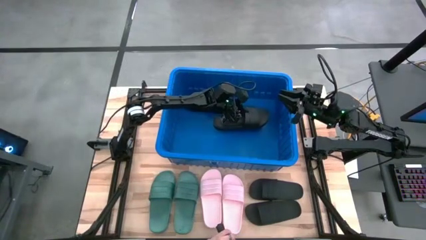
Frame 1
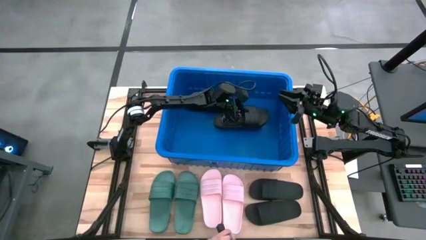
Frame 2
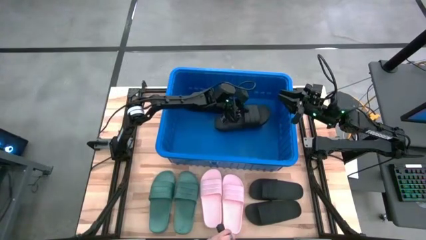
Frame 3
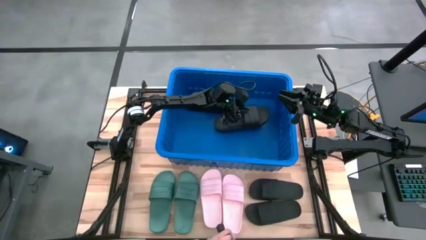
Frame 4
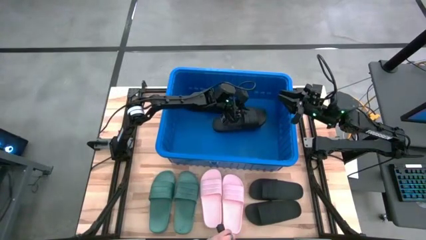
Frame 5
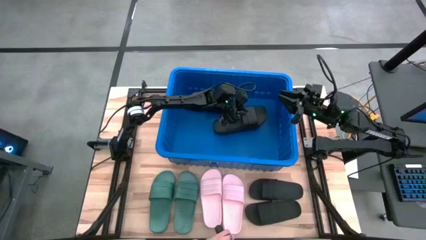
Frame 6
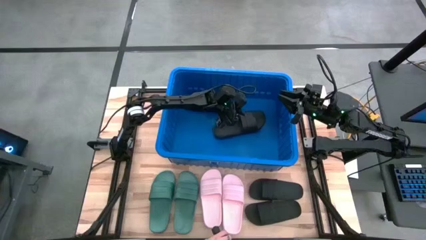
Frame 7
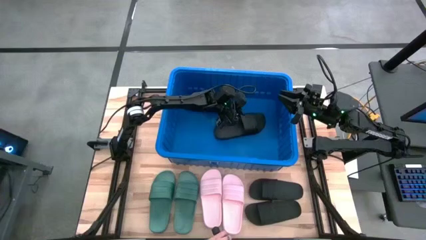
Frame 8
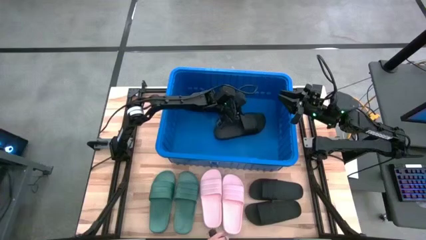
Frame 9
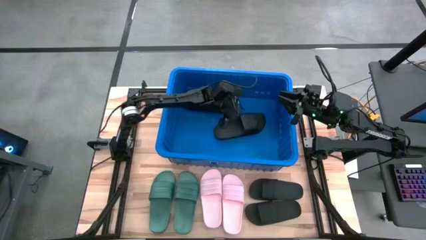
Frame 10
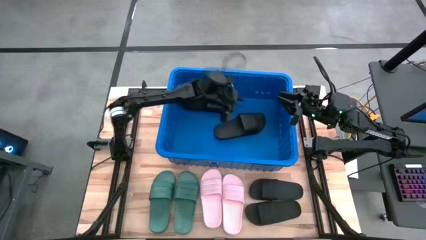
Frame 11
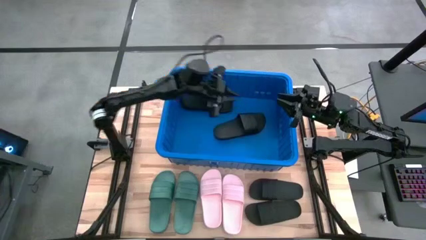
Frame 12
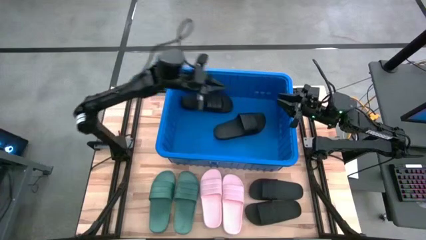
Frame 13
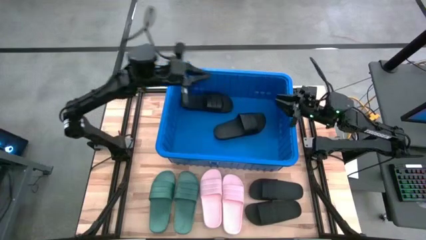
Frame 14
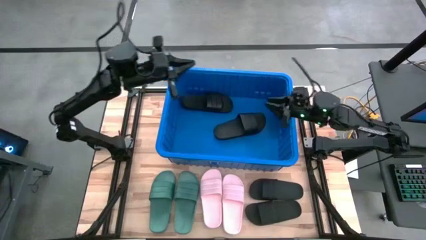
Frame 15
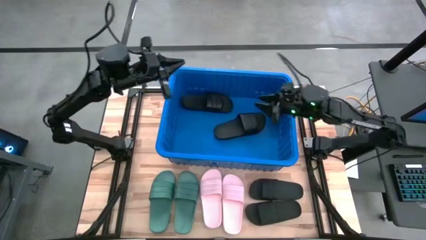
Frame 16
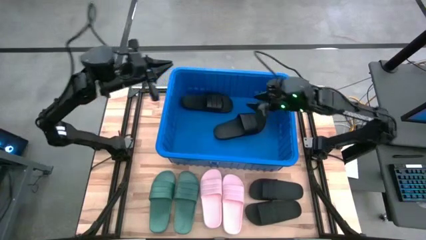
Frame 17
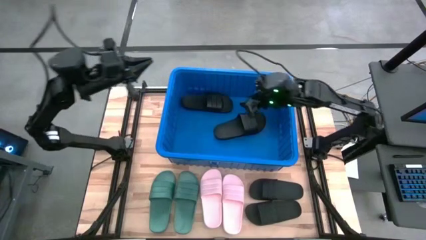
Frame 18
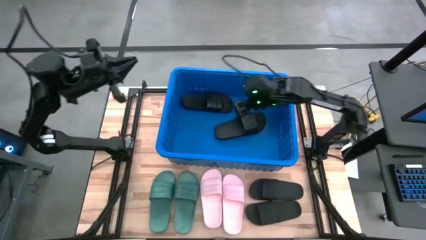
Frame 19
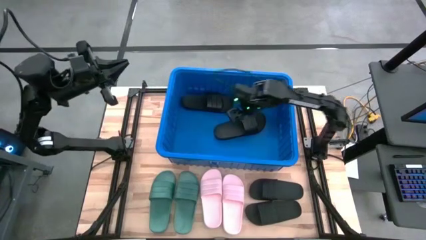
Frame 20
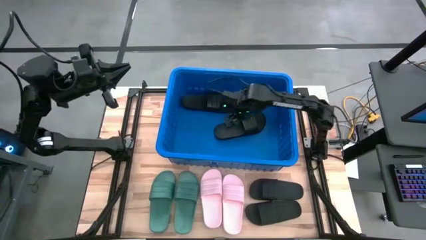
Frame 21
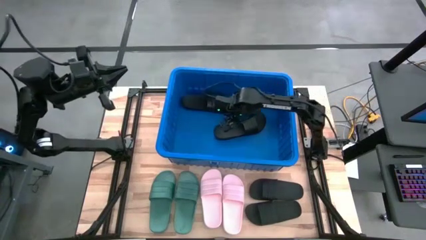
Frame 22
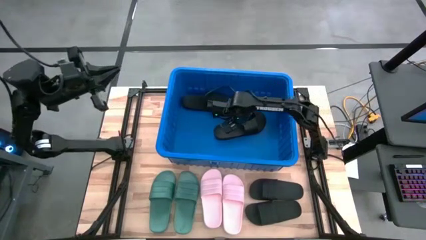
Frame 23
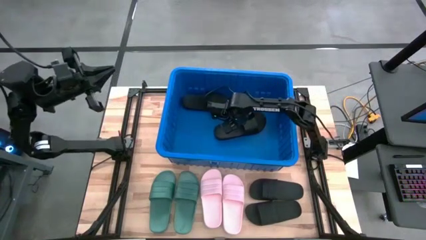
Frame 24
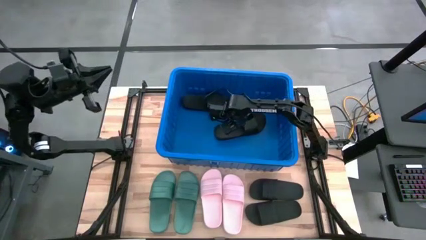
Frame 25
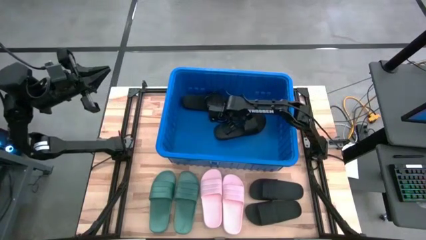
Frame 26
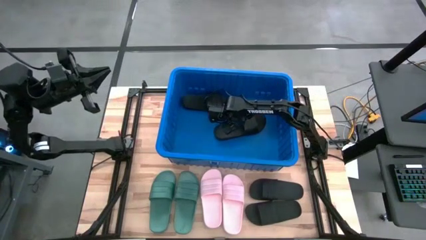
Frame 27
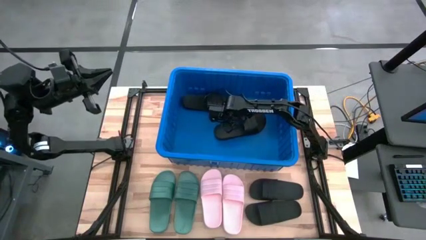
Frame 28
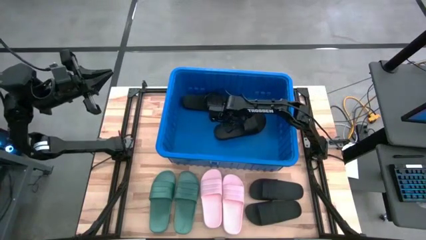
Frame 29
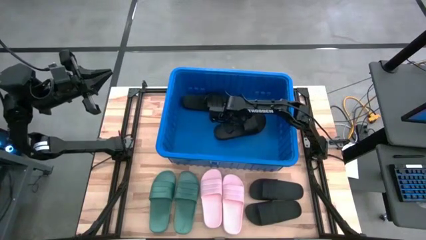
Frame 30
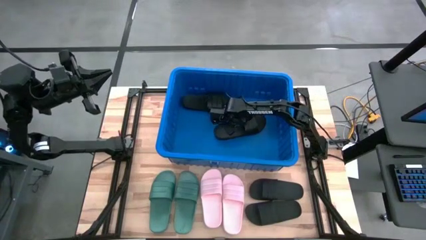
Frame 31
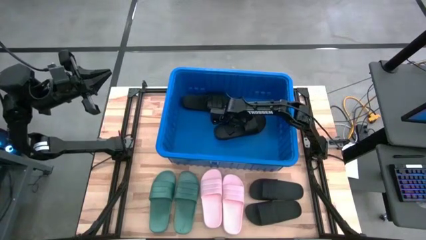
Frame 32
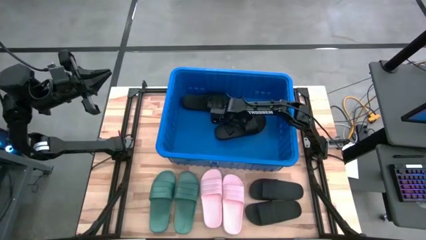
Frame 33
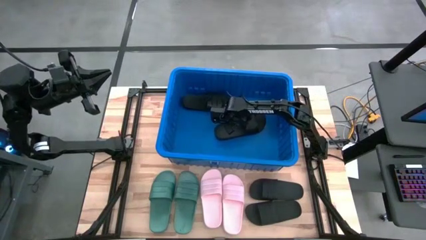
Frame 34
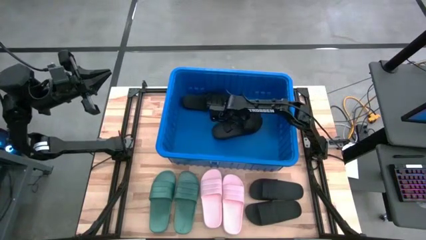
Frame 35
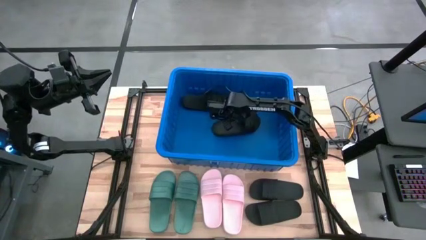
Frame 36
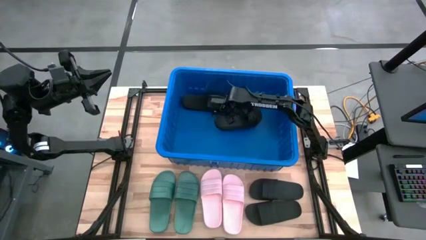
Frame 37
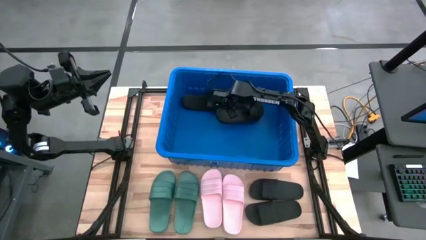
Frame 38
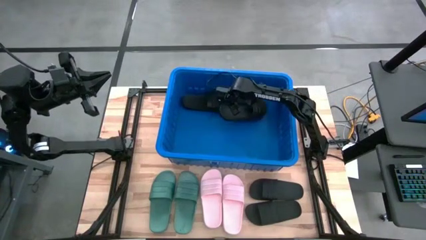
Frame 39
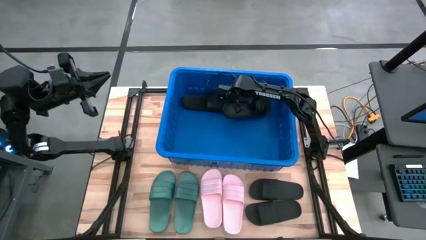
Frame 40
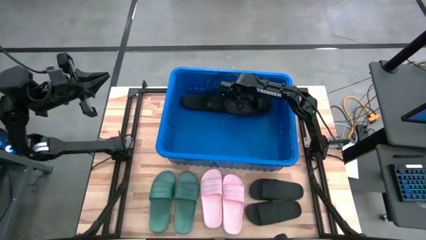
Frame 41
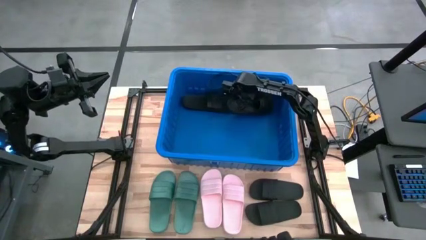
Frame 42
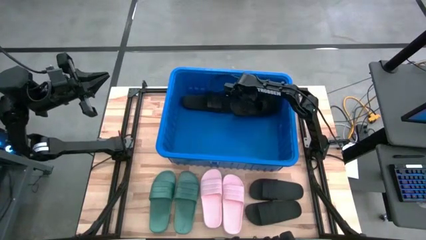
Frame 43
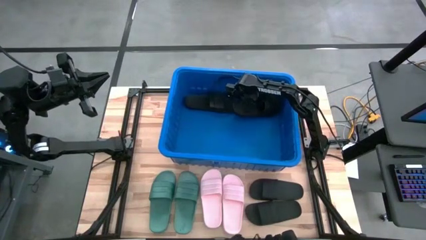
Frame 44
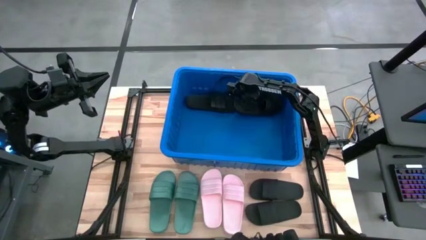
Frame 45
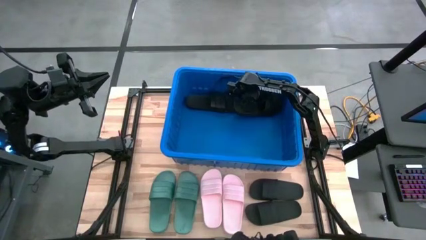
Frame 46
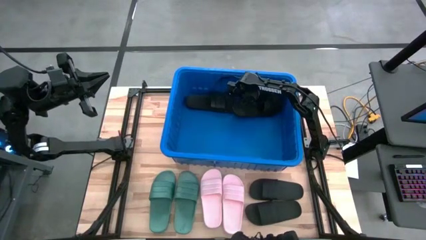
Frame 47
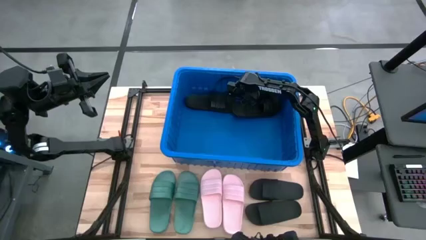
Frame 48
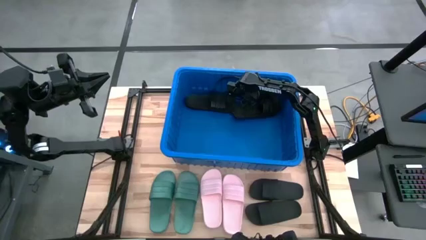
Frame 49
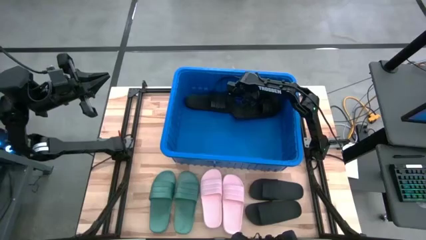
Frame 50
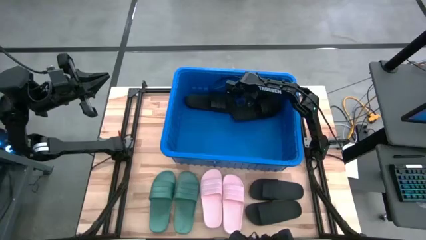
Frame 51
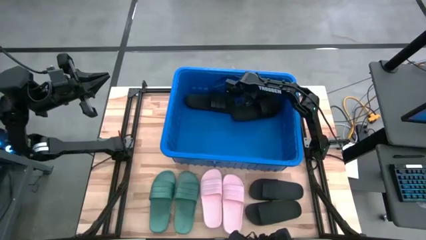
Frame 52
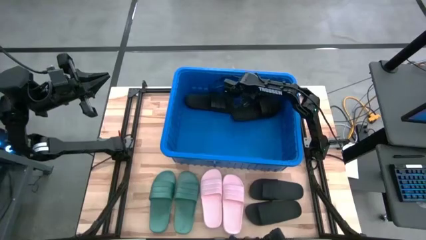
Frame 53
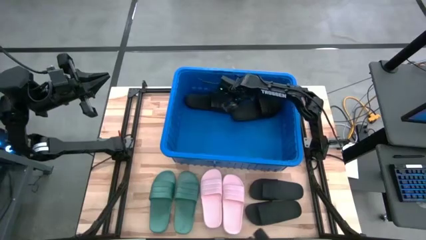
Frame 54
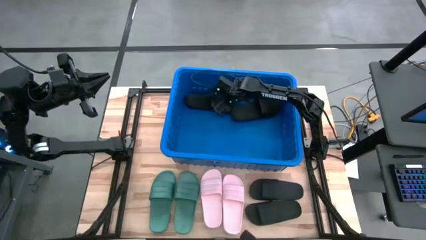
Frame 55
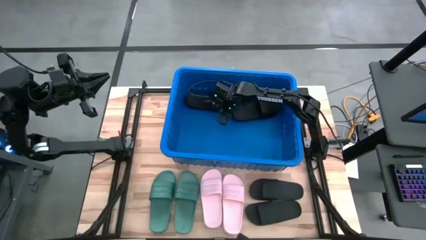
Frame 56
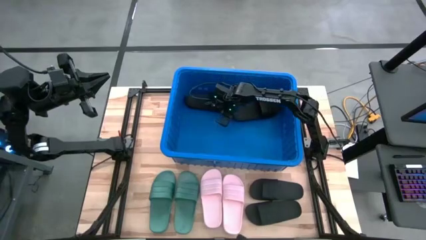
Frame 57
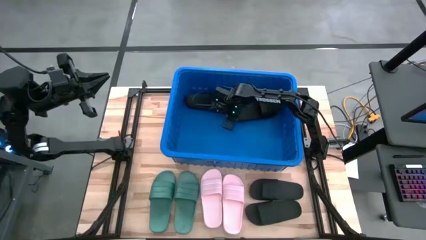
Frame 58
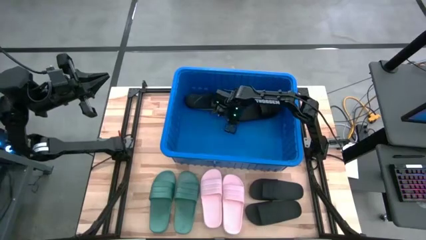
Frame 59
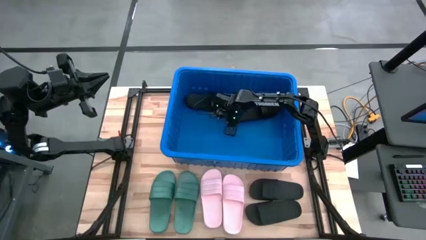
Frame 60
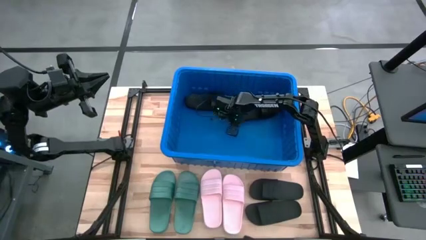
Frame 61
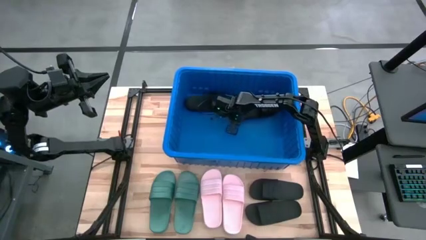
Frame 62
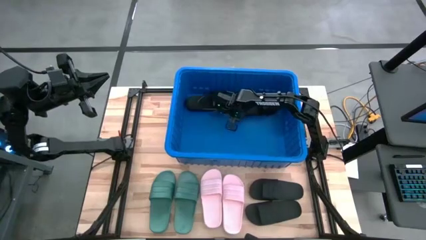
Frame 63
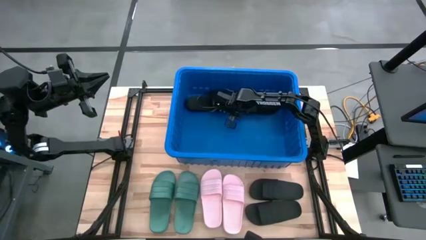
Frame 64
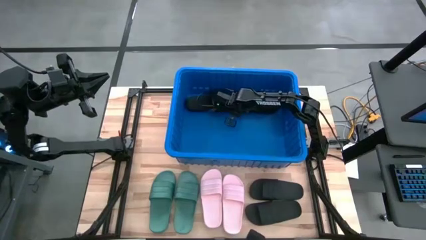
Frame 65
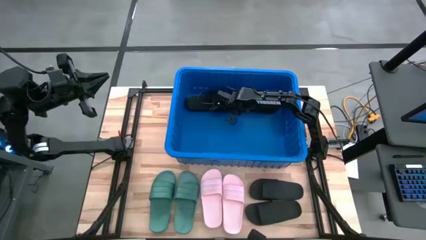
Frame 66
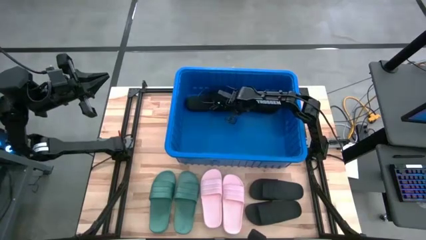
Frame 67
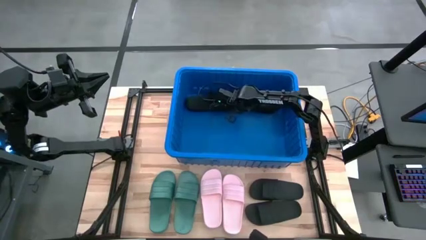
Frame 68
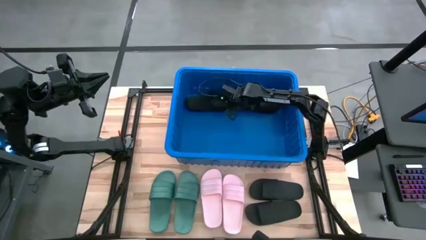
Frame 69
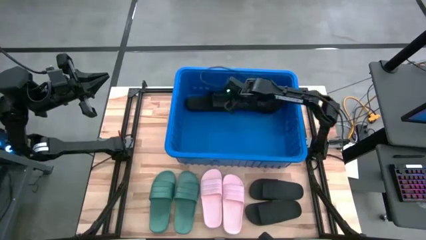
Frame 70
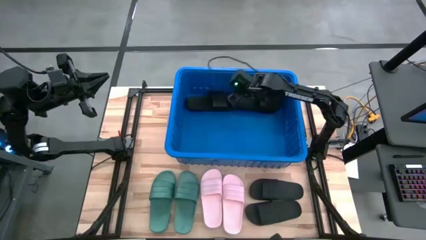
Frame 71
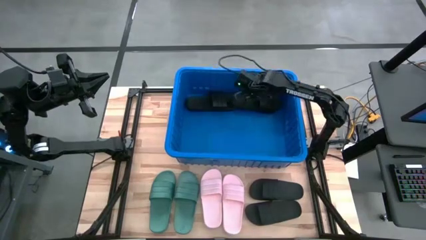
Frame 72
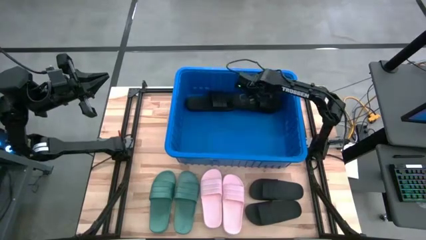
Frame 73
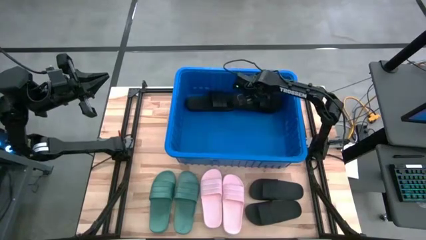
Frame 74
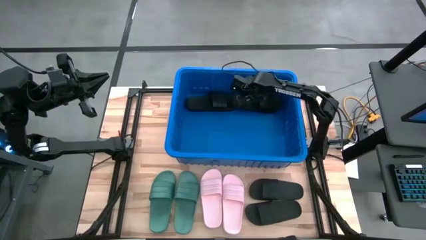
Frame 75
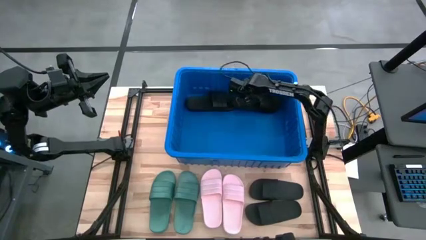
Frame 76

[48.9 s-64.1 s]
Task: Pick and place slides into bin
Stack the black slipper on top of the black slipper in the blue bin
